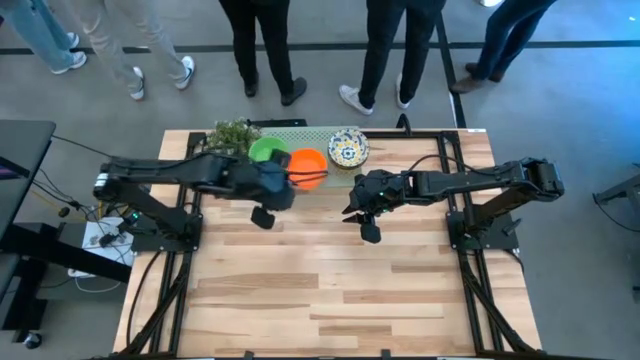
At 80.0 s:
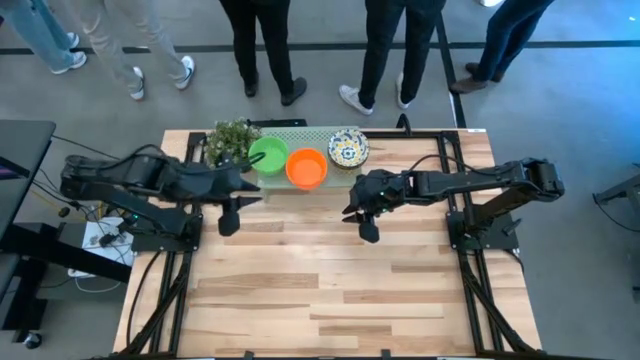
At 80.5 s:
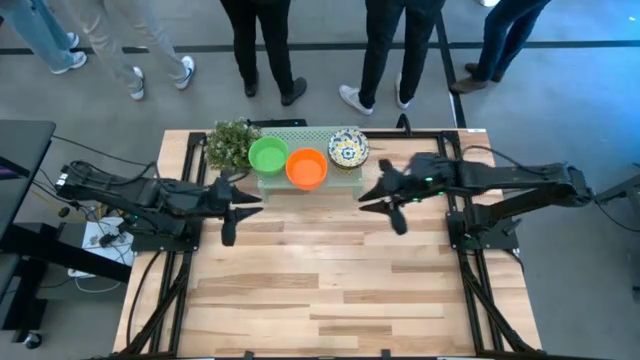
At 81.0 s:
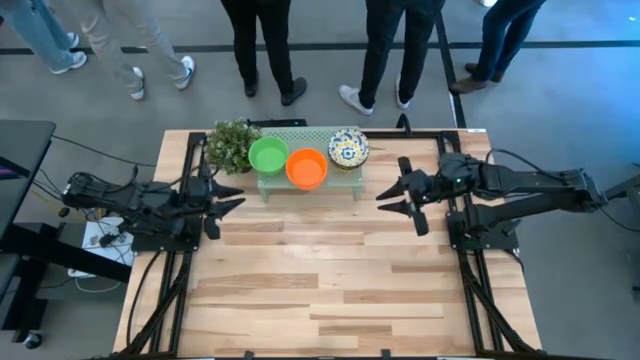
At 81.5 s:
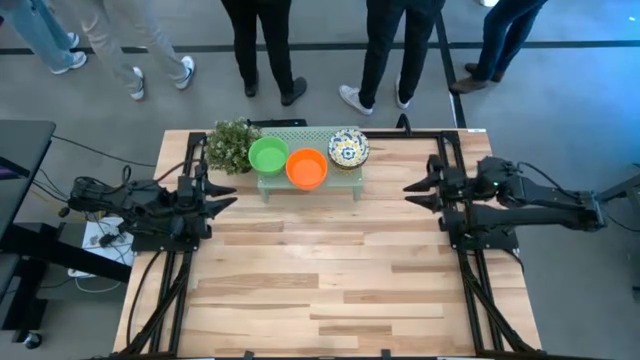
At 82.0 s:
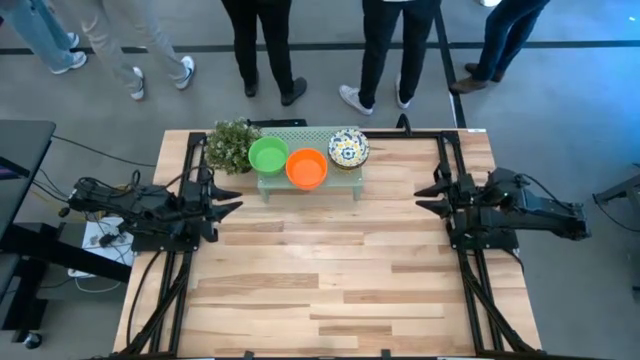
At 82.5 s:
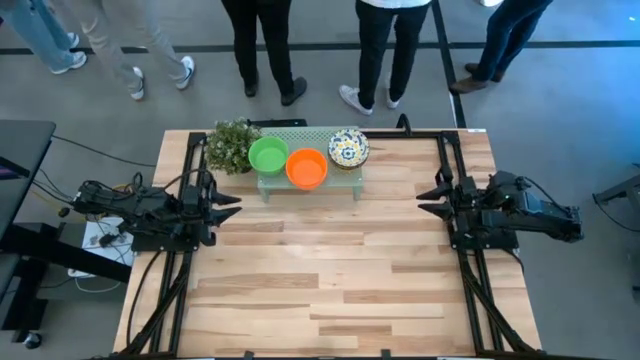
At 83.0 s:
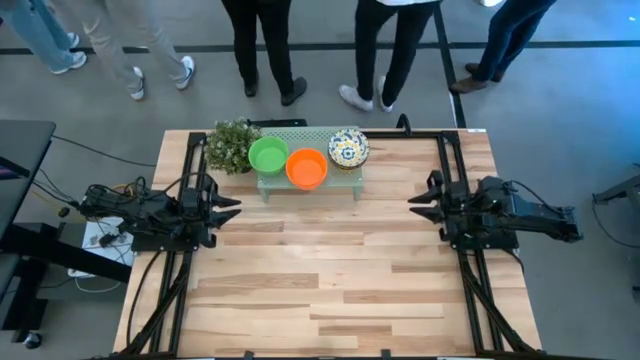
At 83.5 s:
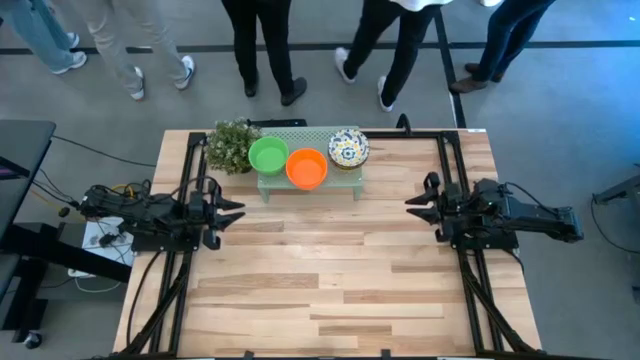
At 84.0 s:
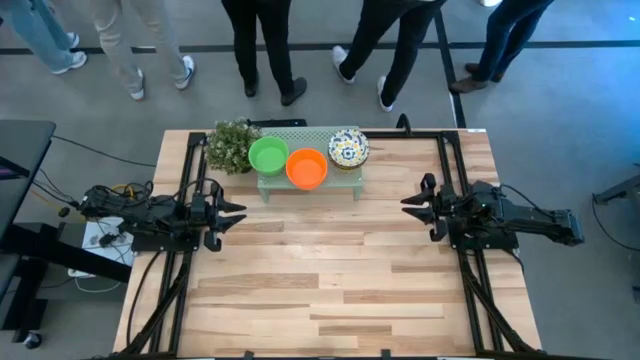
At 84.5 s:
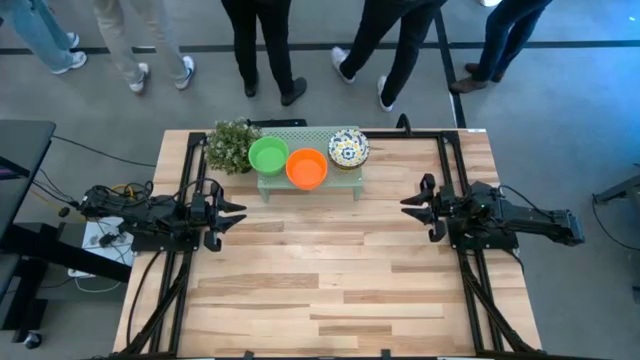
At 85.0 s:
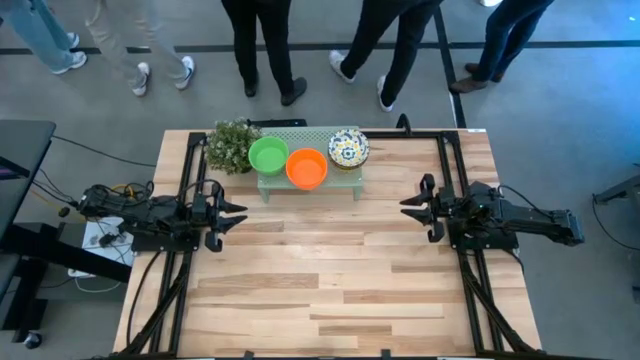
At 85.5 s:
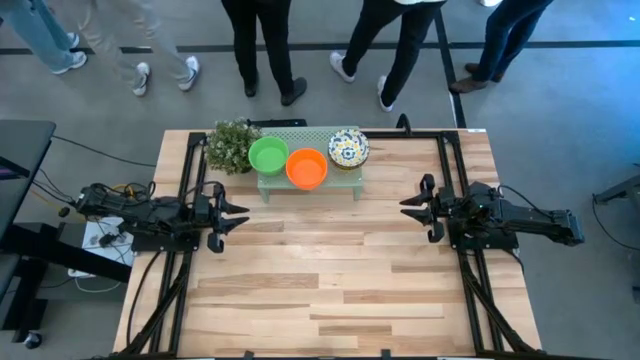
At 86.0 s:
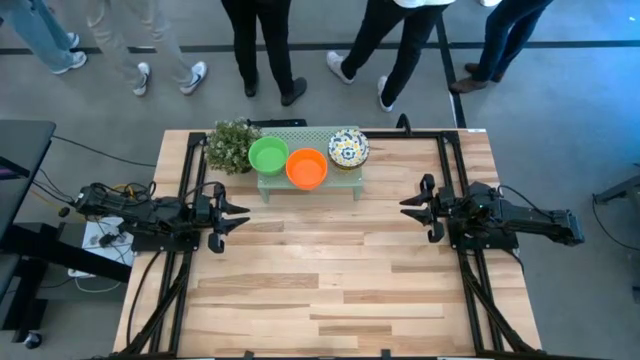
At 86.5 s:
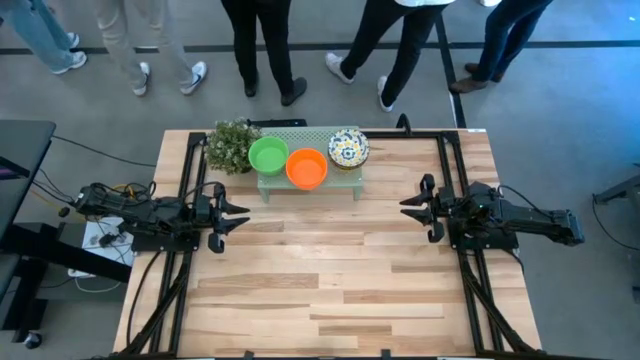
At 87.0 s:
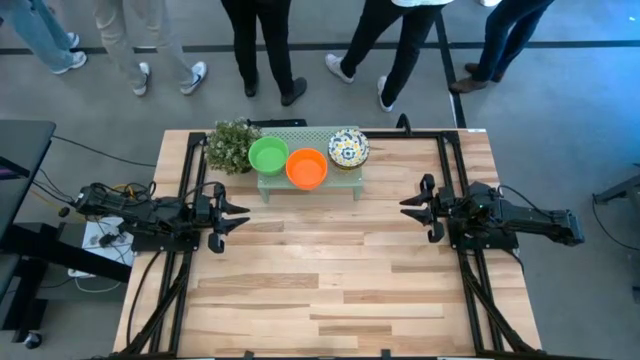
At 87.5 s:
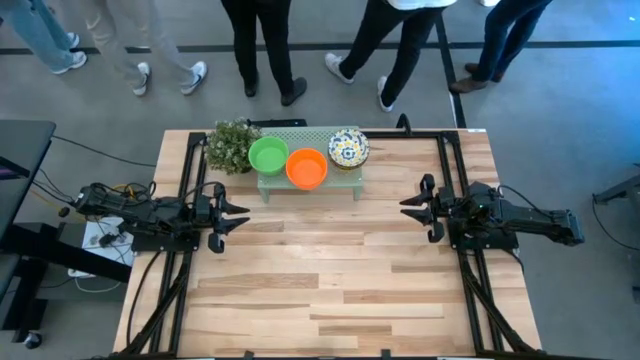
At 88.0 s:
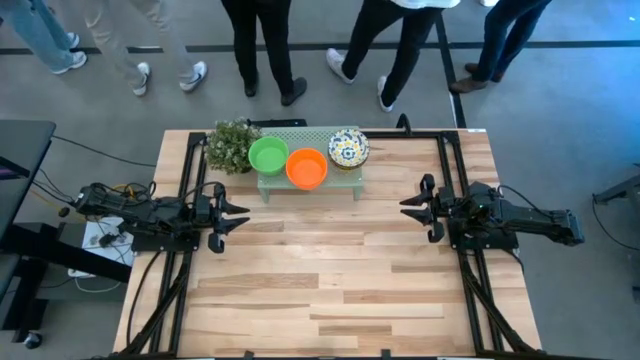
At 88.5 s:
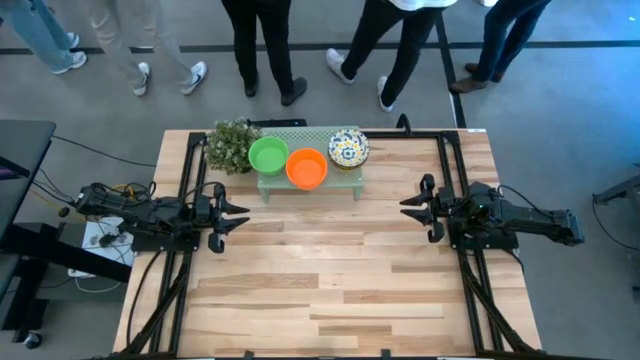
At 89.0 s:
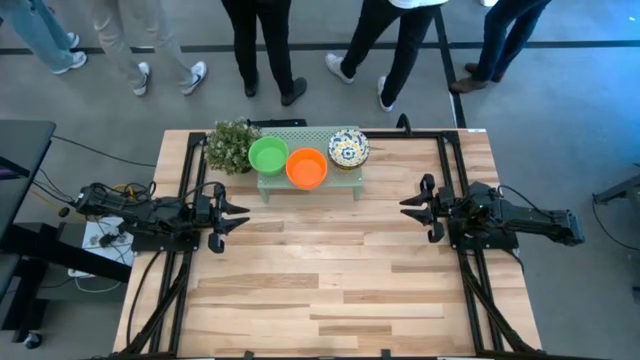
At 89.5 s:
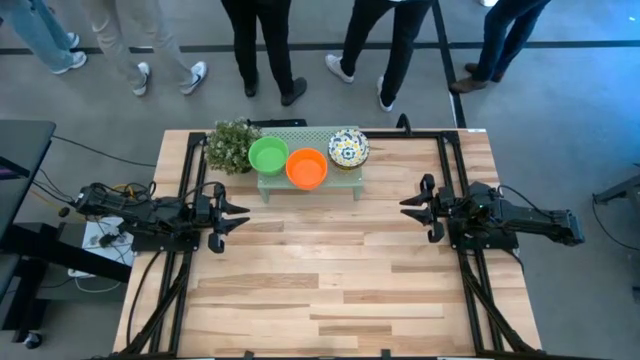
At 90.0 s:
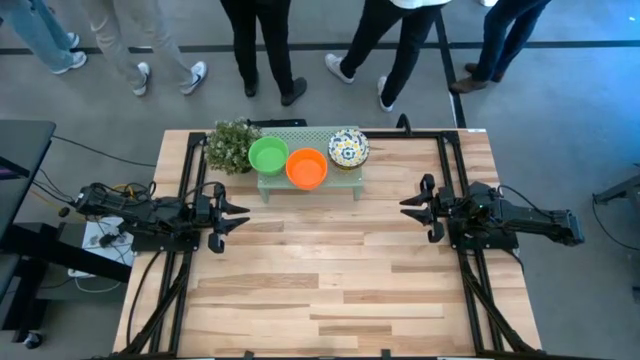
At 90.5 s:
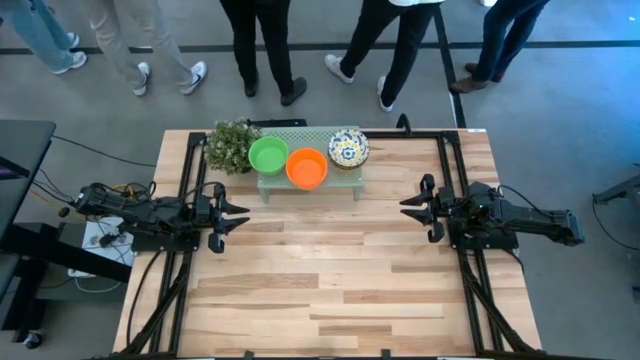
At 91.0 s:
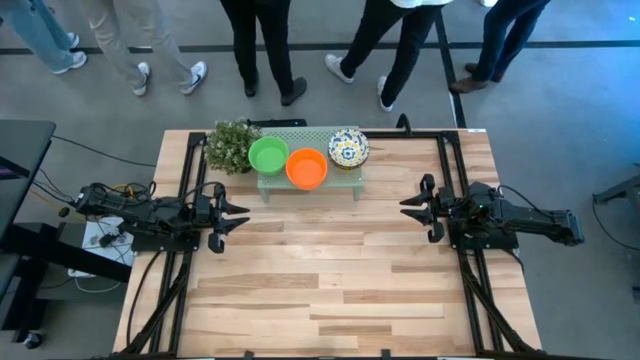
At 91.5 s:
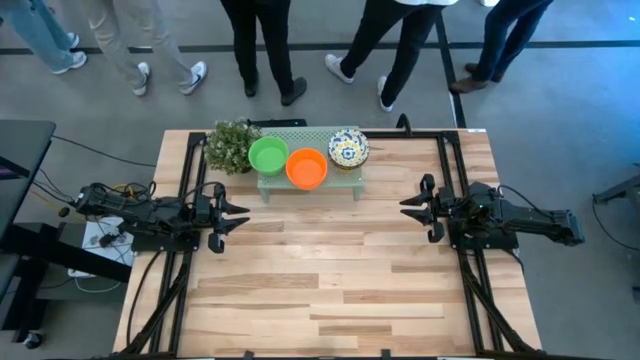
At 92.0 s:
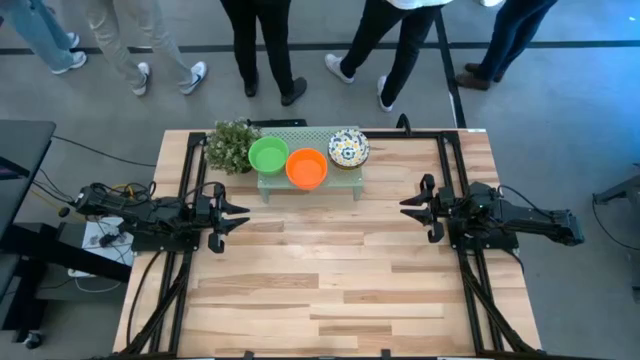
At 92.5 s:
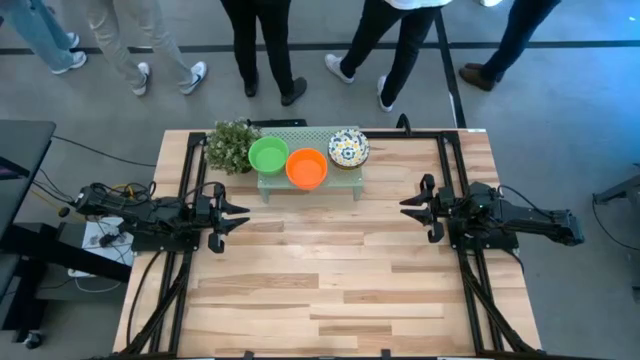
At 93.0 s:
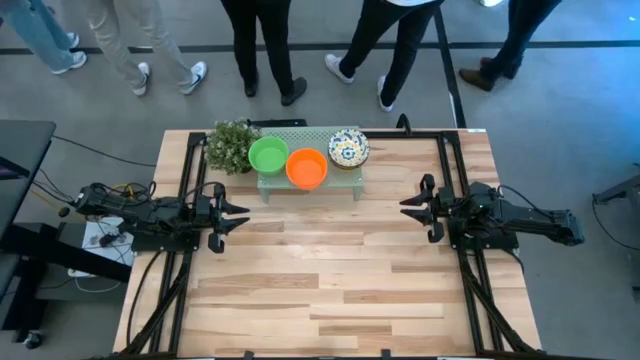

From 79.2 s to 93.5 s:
Task: Pick & Place Mini bowls
Return to Home Position

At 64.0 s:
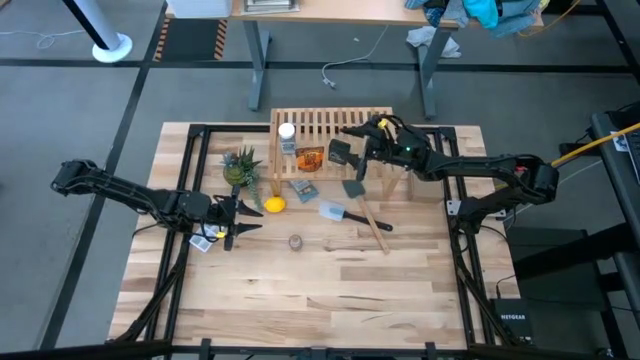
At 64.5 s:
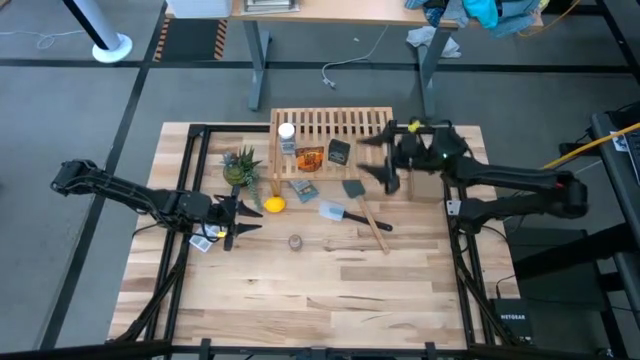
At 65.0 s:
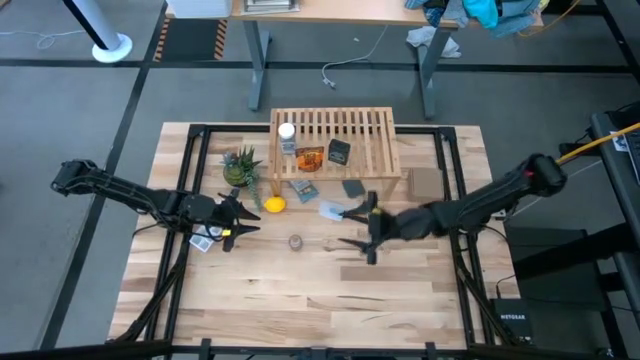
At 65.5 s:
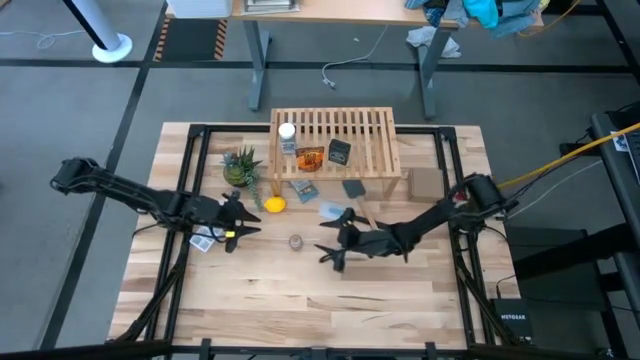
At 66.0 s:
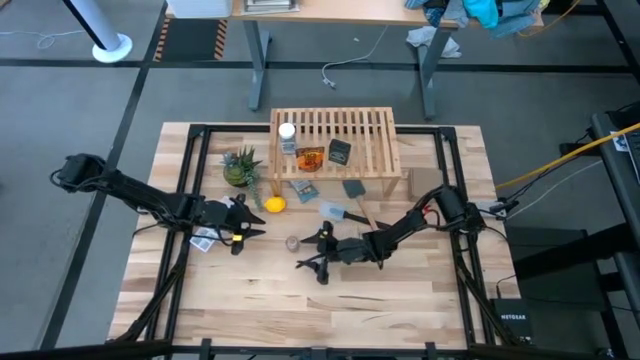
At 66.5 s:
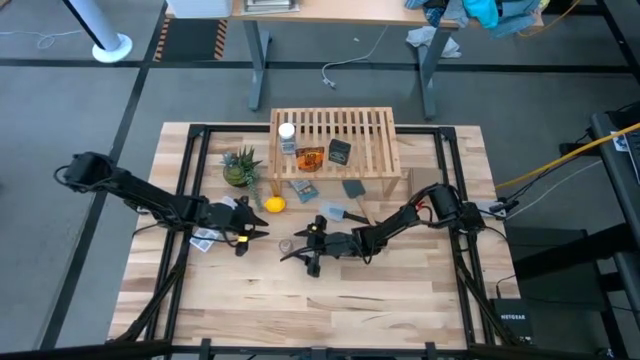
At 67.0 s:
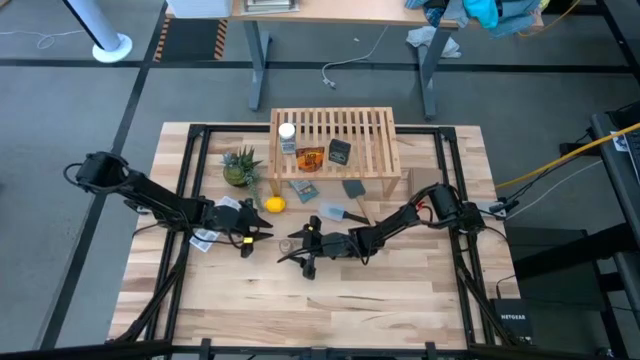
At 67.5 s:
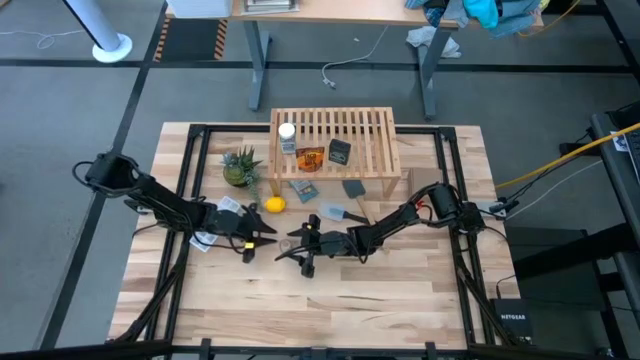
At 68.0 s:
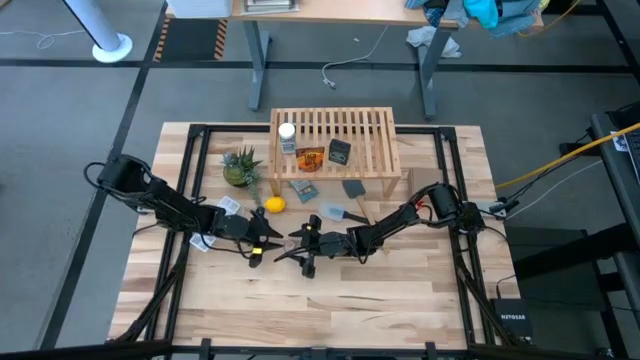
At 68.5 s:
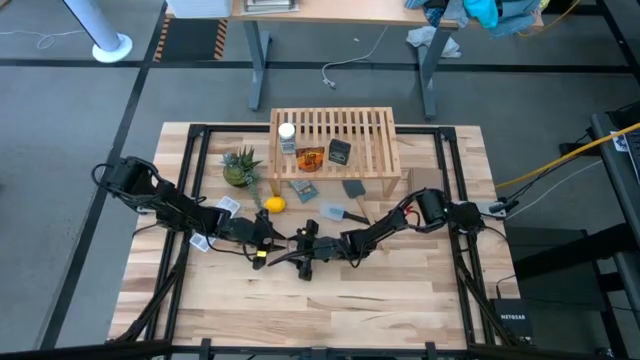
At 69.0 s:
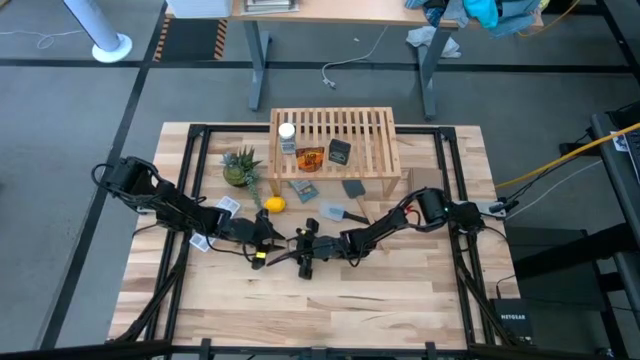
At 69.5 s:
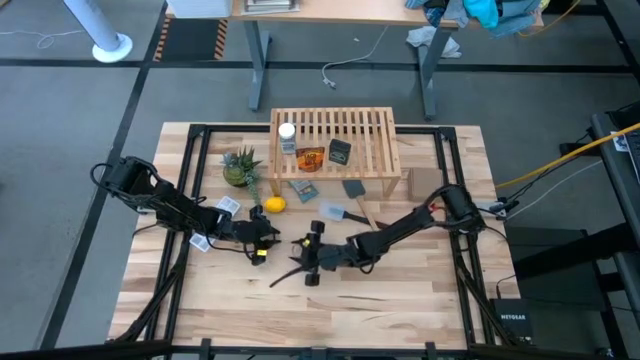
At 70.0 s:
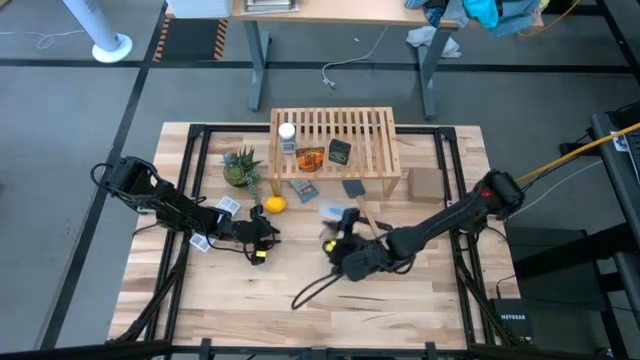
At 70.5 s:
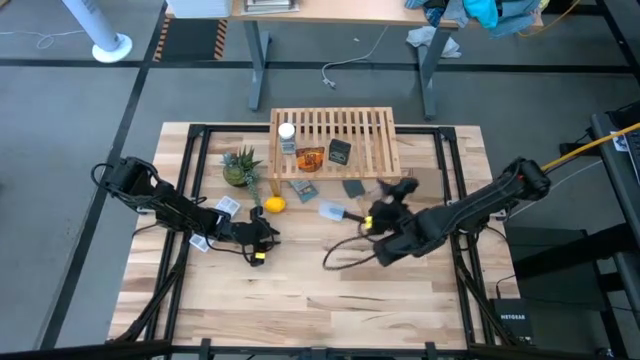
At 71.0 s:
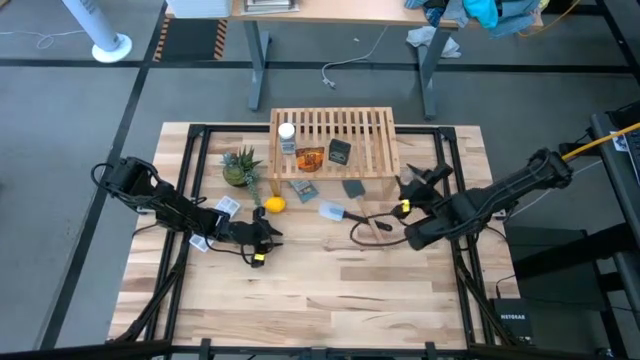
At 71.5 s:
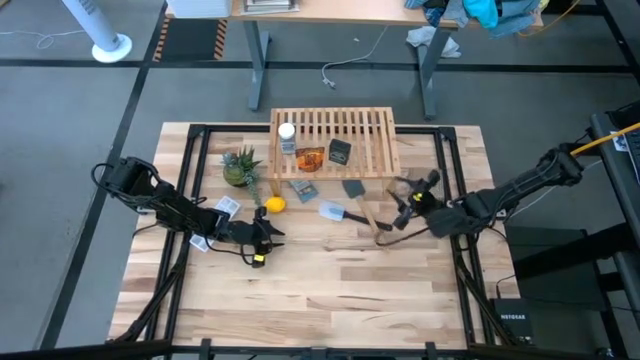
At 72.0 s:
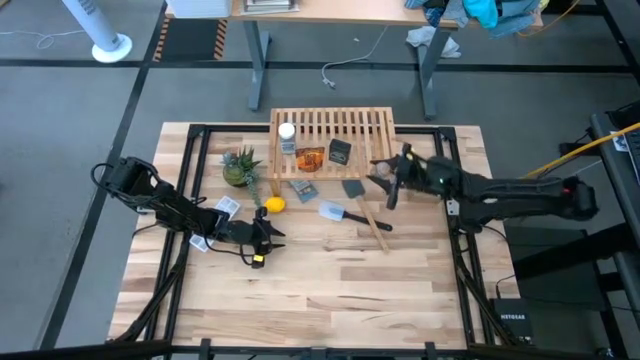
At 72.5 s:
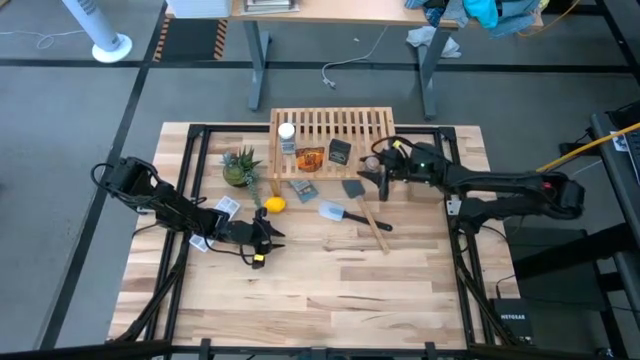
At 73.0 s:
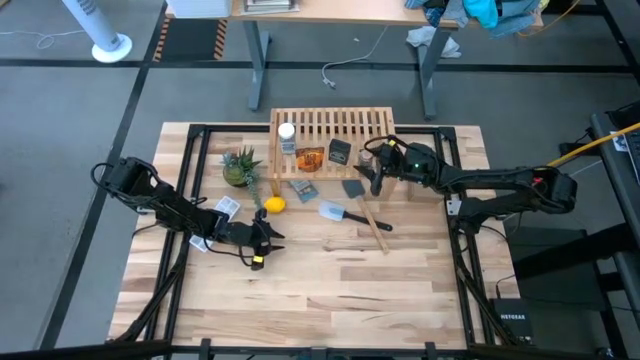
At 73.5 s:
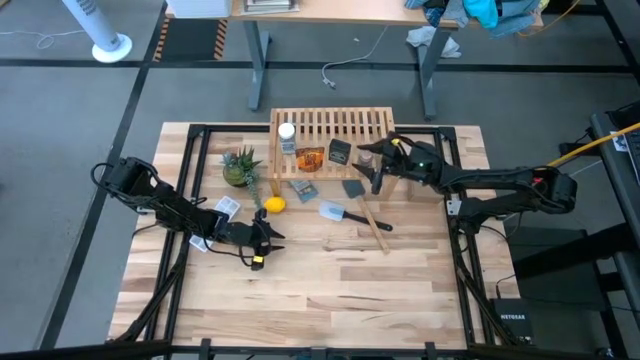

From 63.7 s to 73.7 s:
Task: Shelf spices
Put the brown seasoning bottle on the shelf
